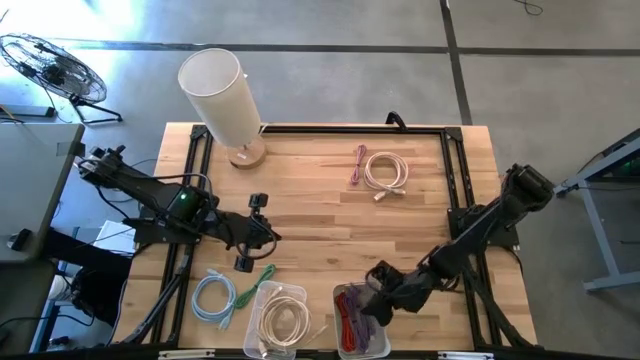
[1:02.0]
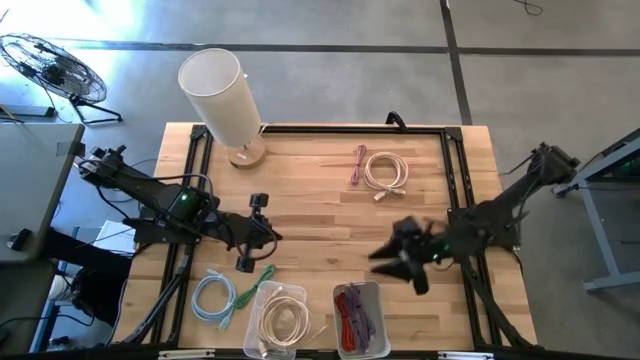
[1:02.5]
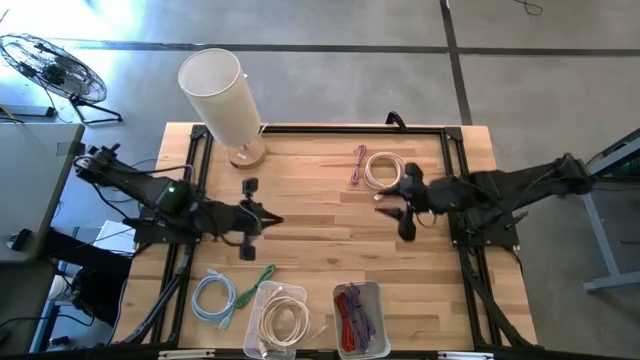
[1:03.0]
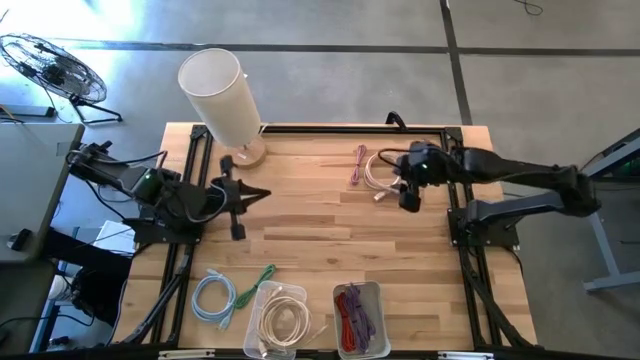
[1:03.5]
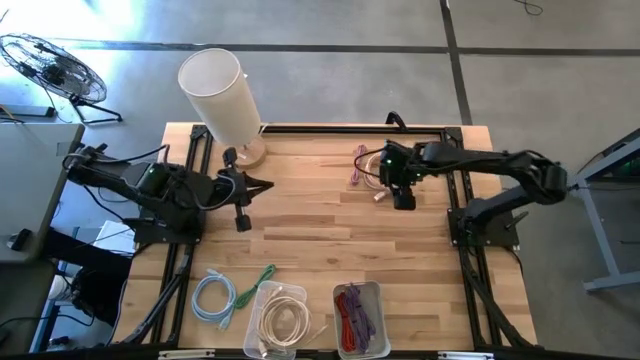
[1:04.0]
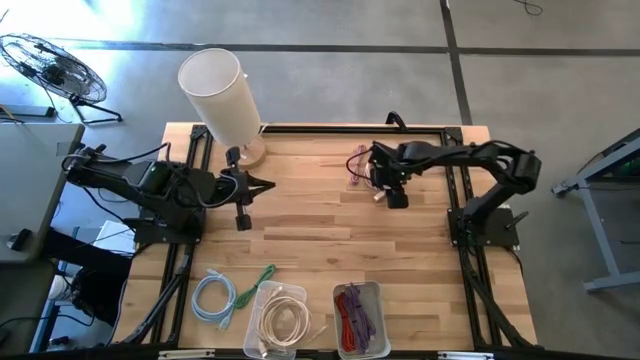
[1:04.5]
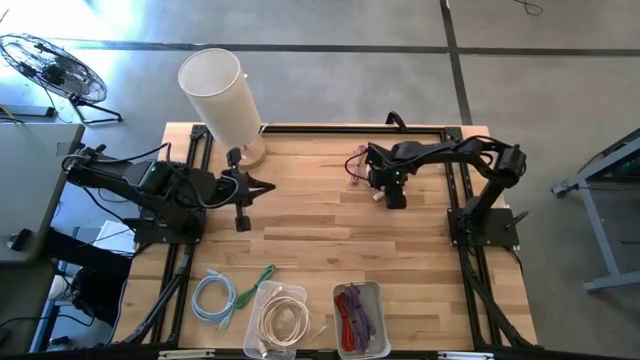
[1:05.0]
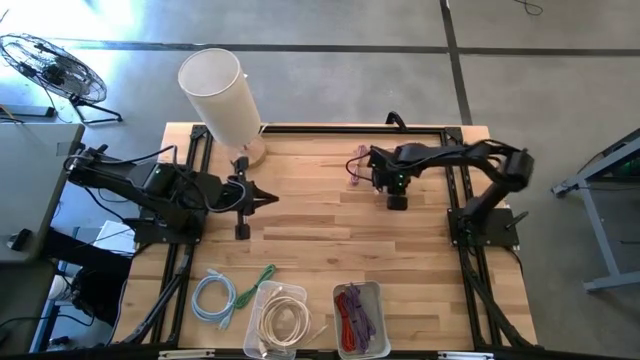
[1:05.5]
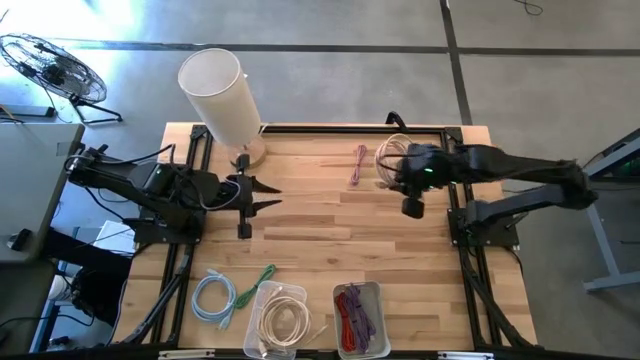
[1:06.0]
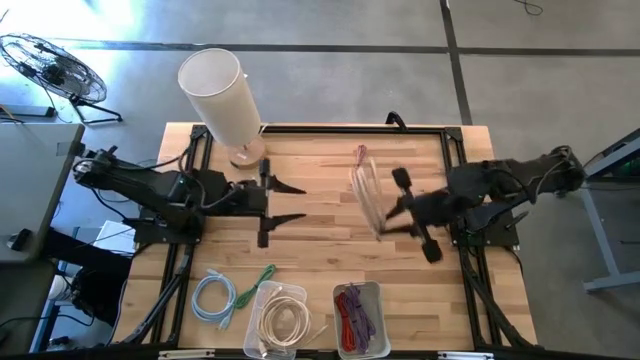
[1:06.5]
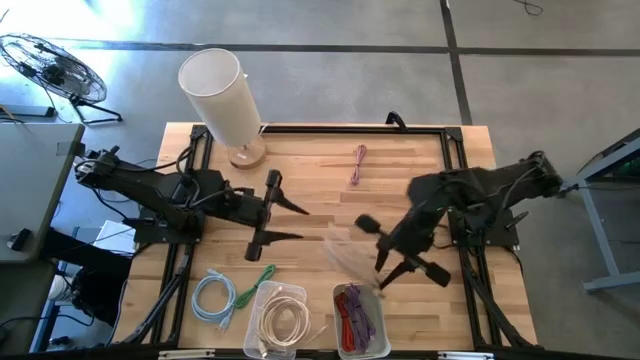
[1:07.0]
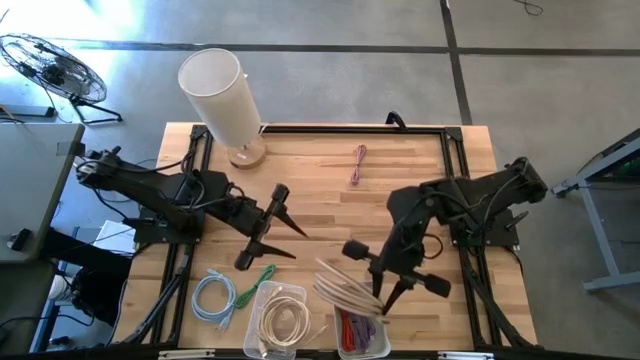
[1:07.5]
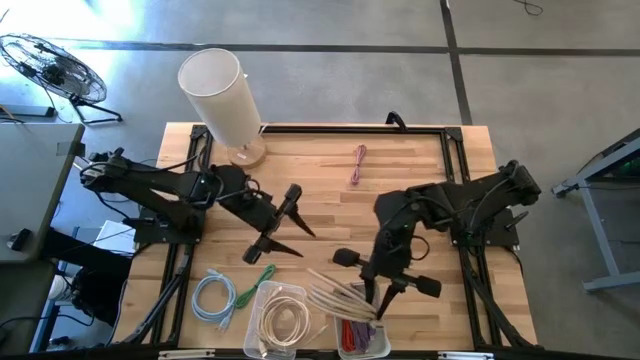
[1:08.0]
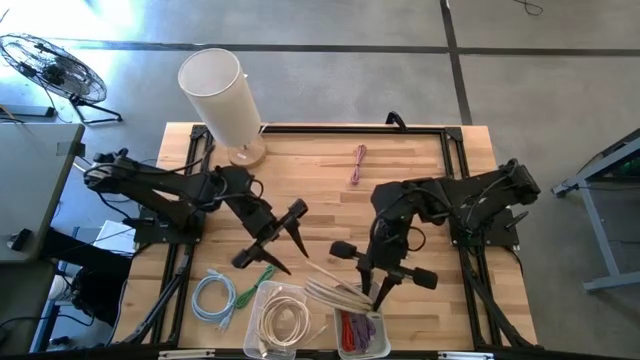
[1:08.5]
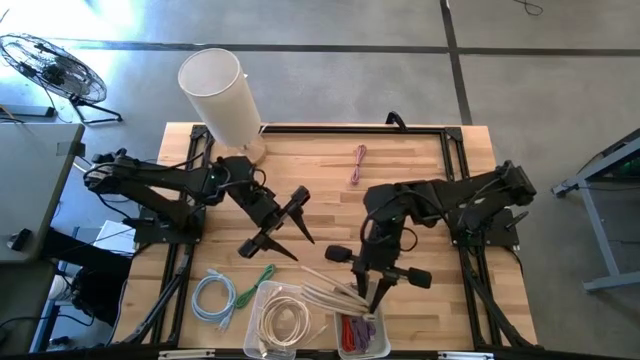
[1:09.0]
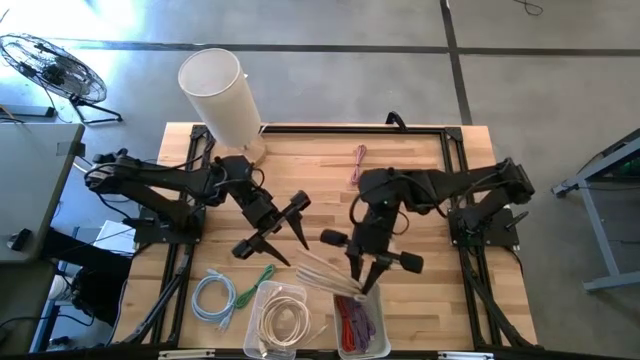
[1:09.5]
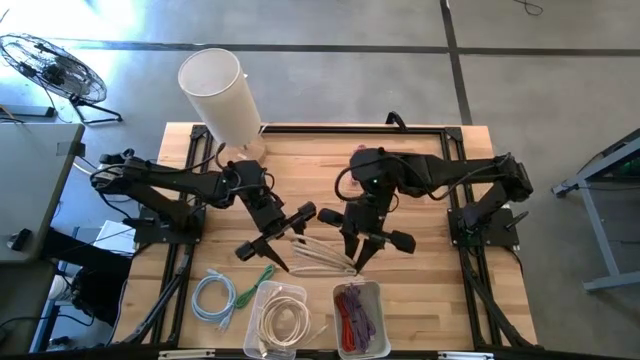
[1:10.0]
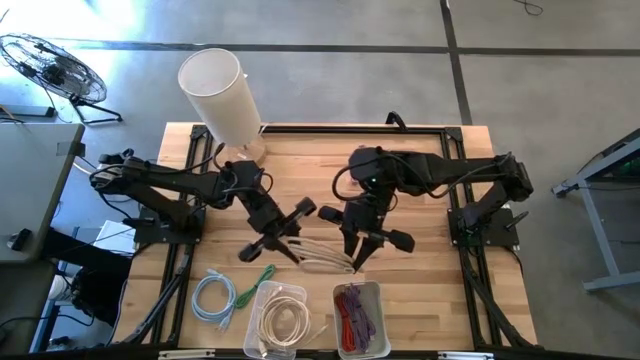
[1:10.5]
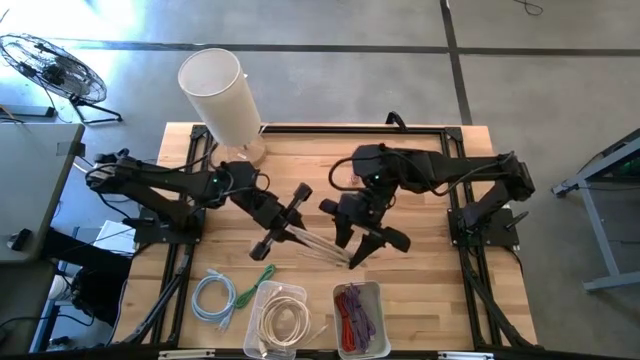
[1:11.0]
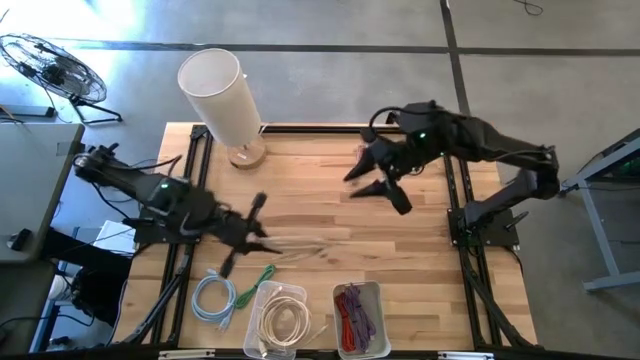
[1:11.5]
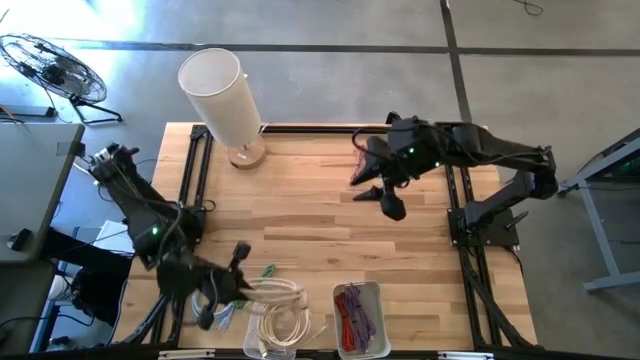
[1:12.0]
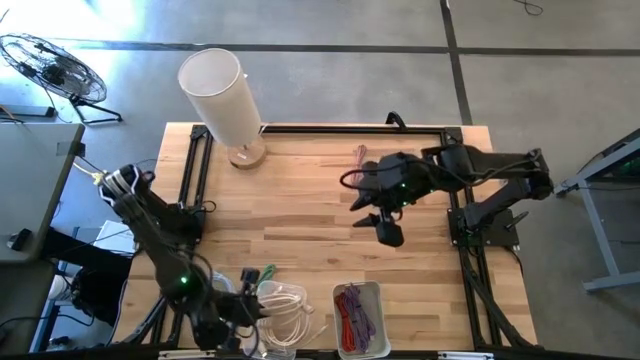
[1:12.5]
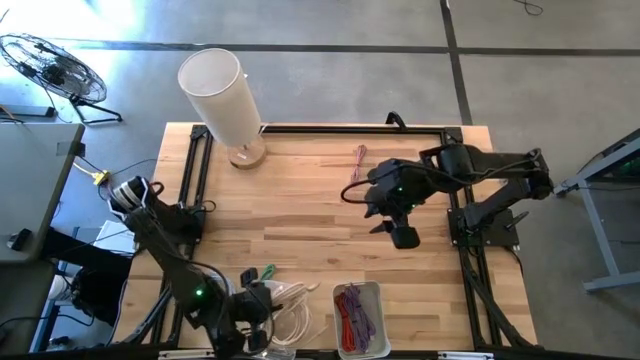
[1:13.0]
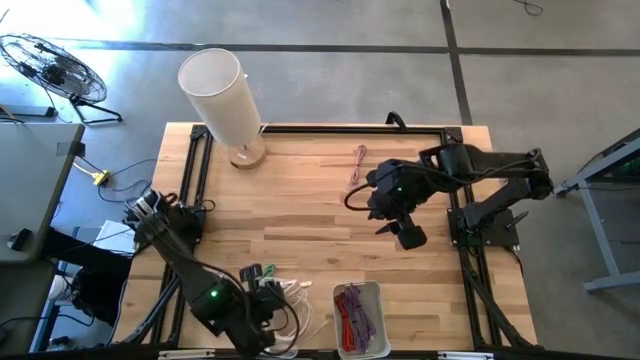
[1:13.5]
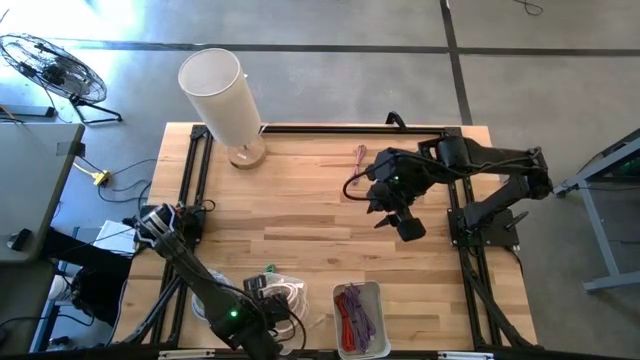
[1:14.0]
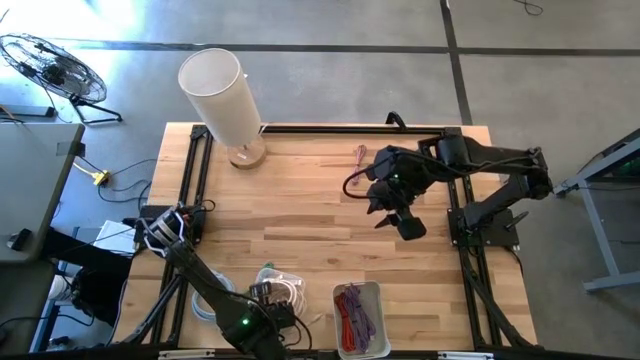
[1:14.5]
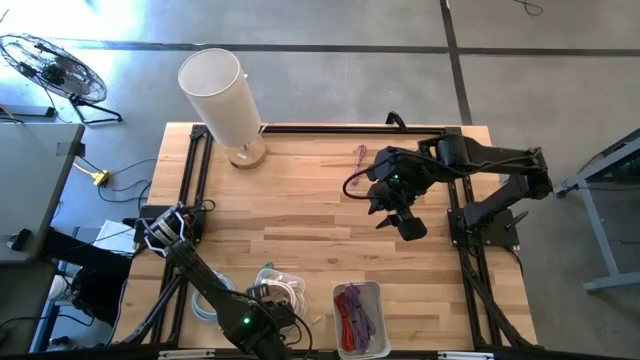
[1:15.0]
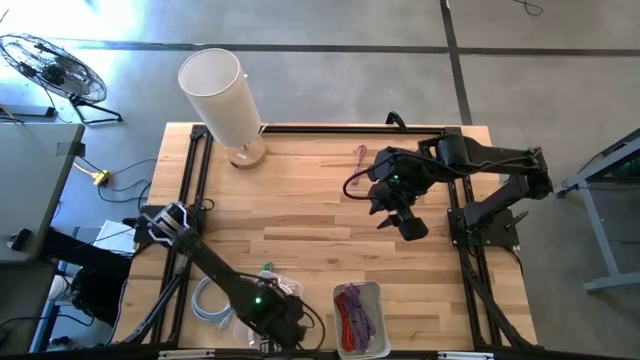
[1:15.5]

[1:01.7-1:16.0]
Task: Pick & Place USB Port
Put the pink HDMI cable into the transparent bin

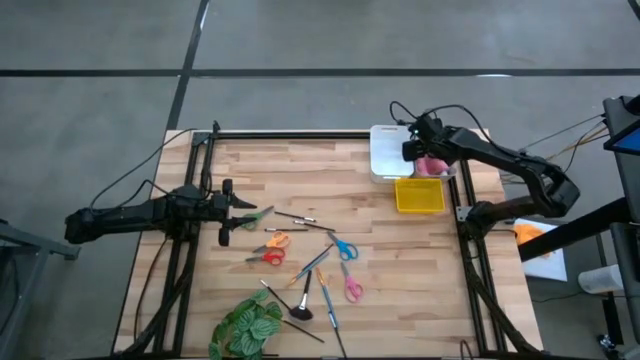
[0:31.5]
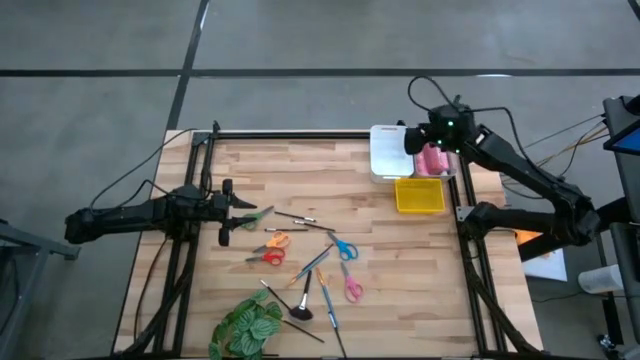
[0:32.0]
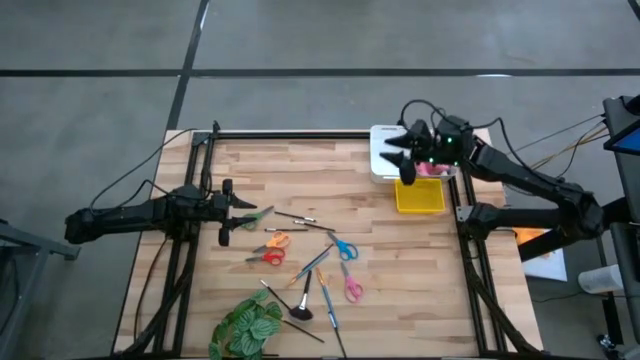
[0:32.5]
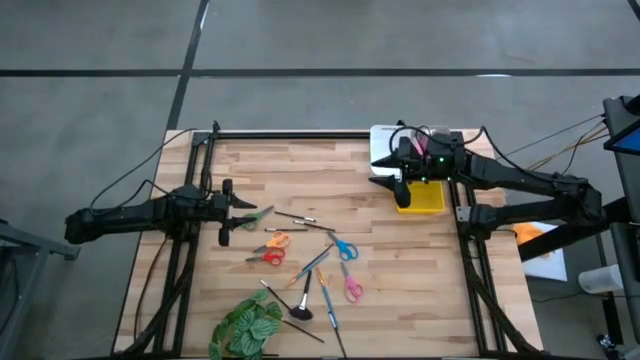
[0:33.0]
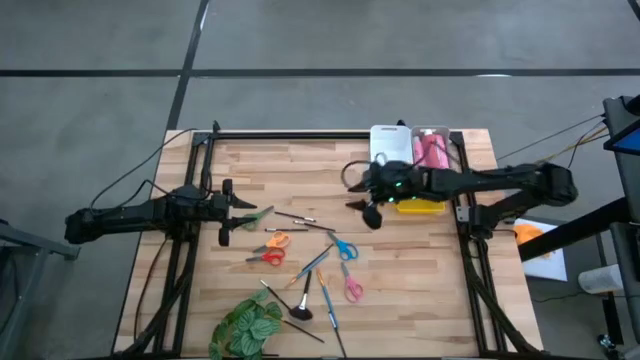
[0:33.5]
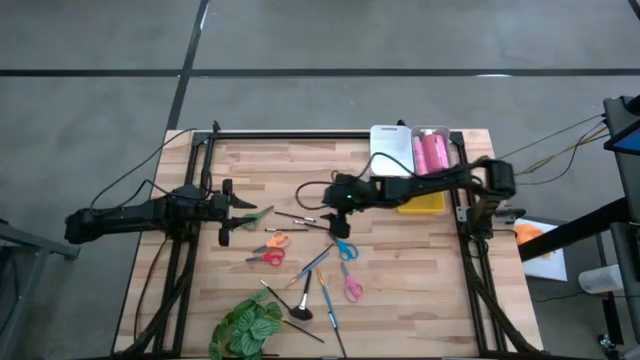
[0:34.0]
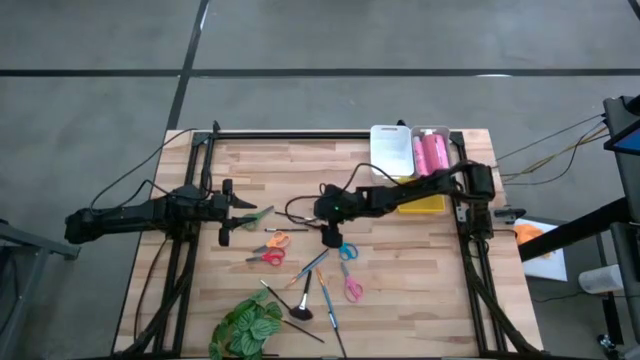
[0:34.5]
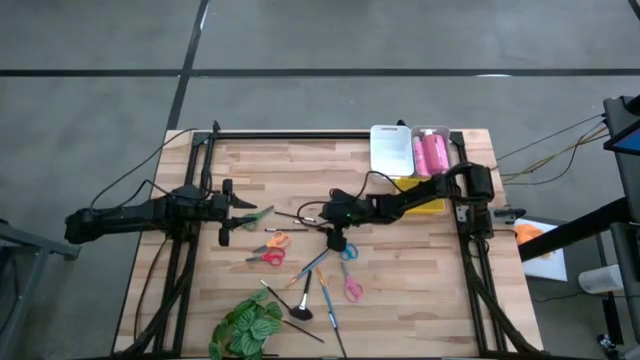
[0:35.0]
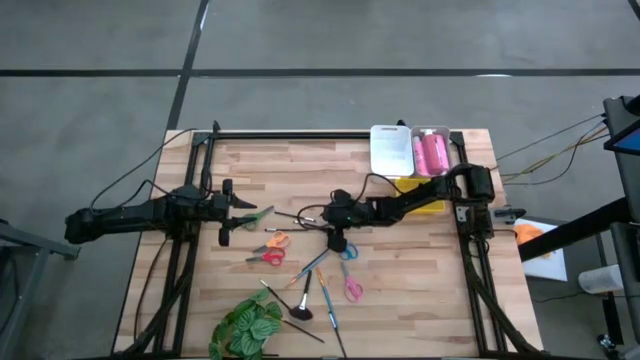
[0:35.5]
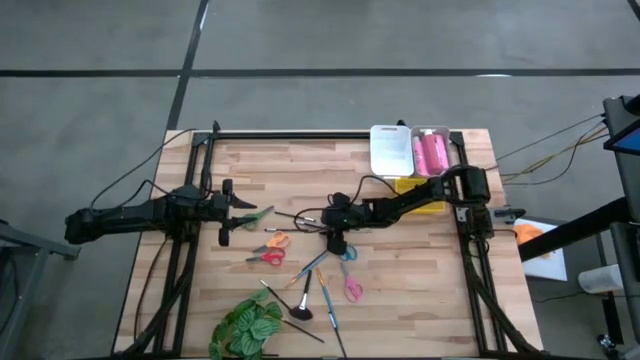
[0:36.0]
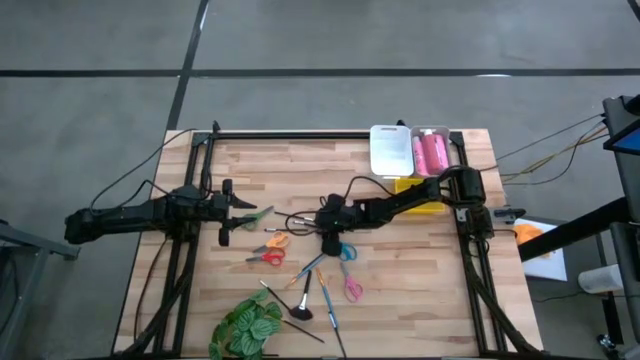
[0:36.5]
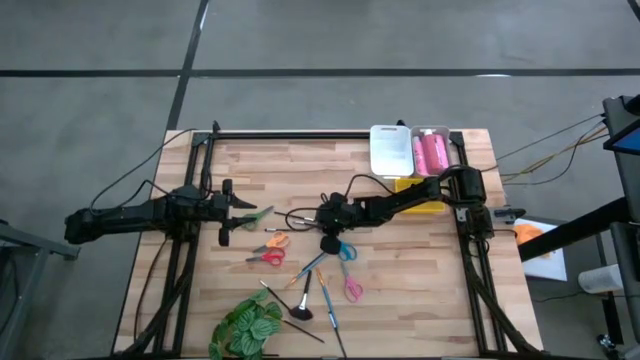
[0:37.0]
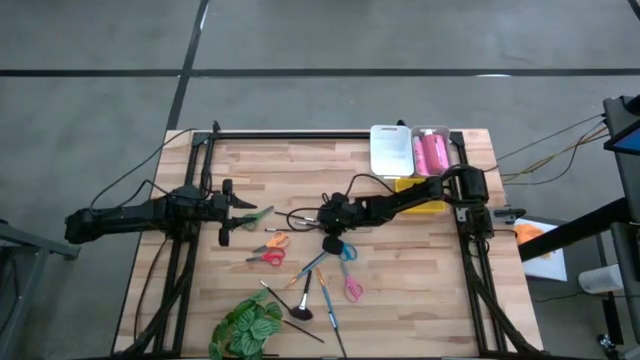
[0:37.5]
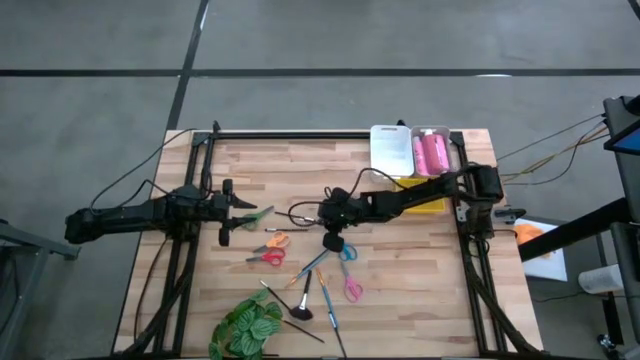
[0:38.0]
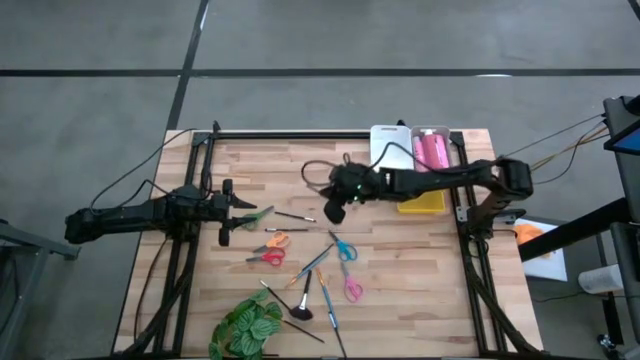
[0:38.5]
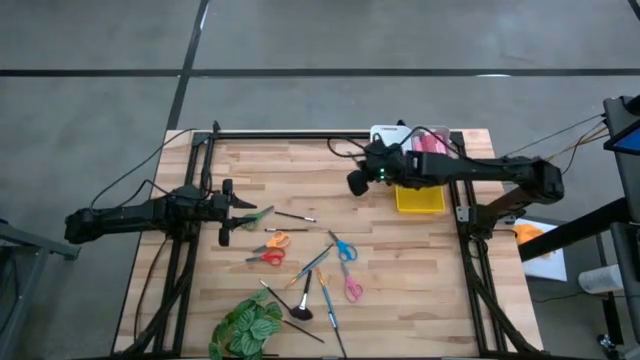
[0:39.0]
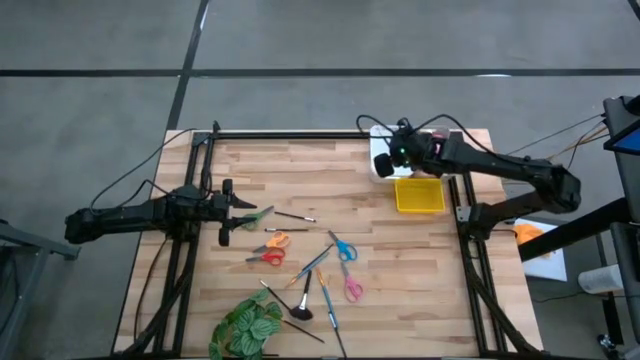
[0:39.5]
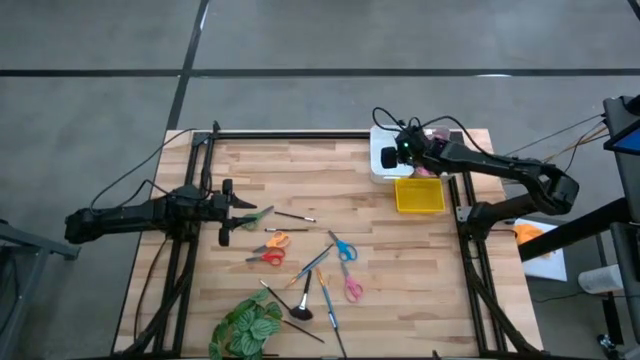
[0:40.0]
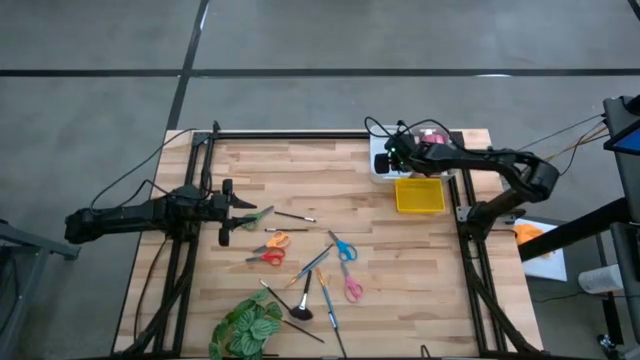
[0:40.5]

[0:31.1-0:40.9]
Task: Pick & Place Paint Supplies
Put the black paint brush into the white bin
